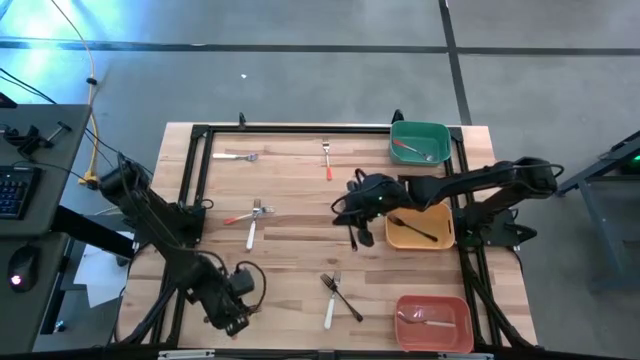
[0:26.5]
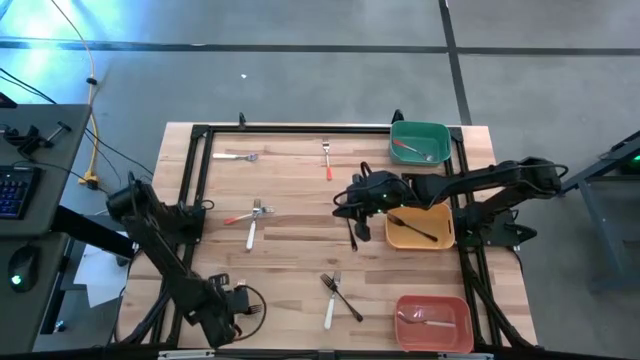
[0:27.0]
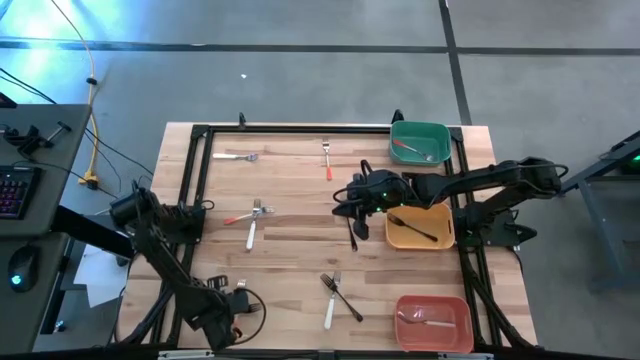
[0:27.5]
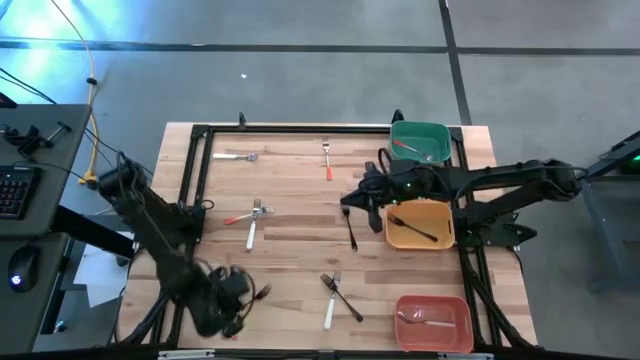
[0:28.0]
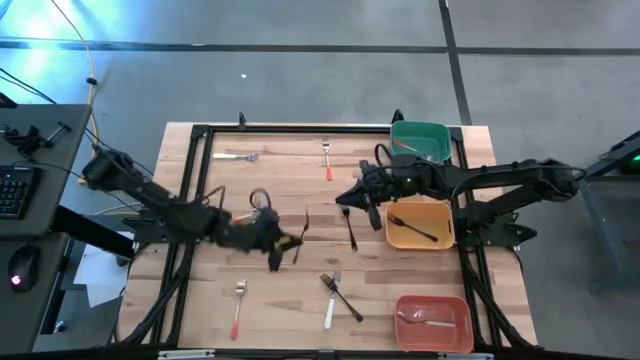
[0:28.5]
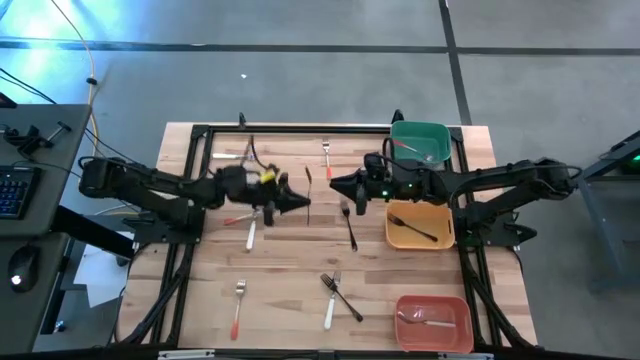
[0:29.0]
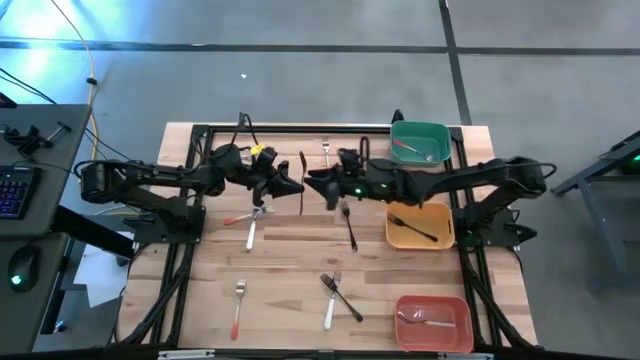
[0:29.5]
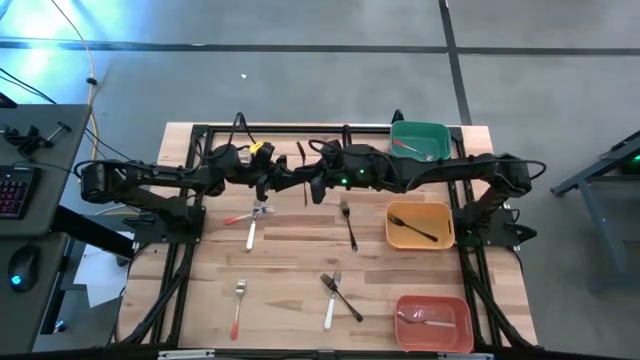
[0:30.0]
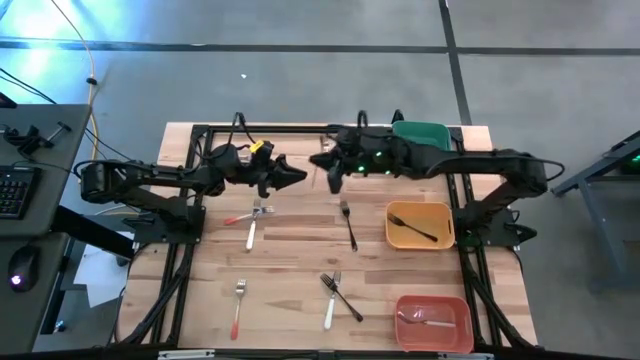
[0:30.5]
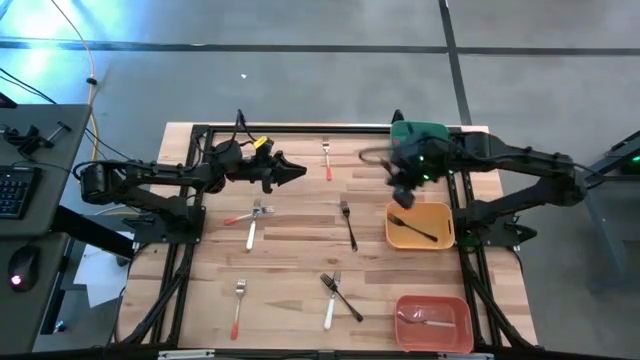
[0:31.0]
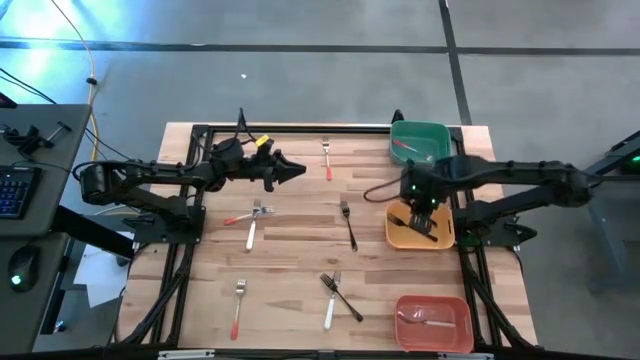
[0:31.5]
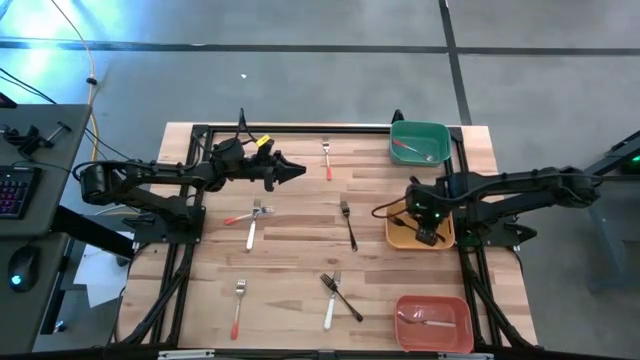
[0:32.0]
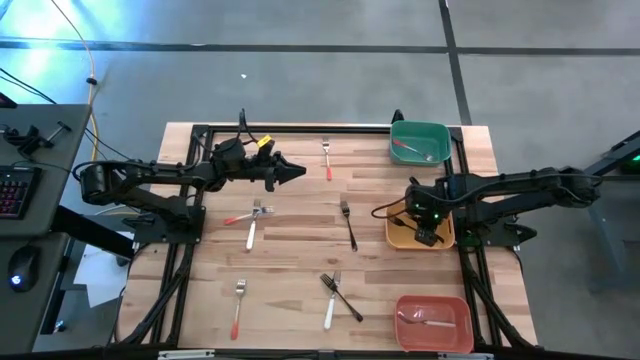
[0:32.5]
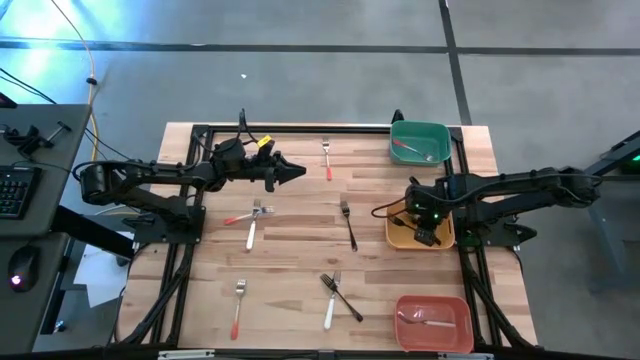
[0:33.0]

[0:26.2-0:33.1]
Task: Sort silverware by color (type)
Put the black fork into the yellow bin

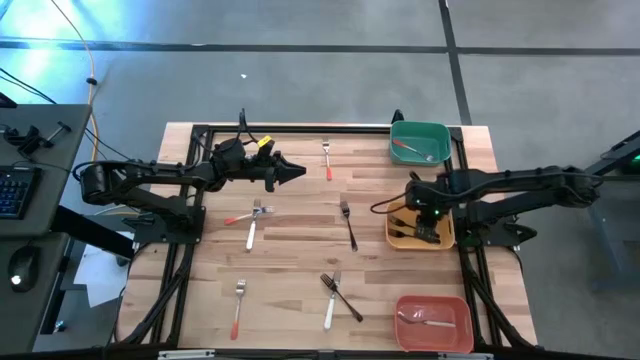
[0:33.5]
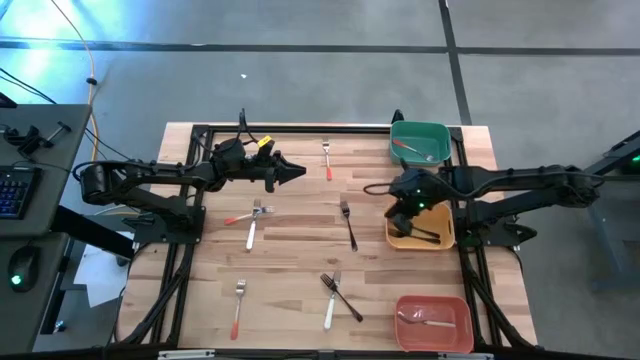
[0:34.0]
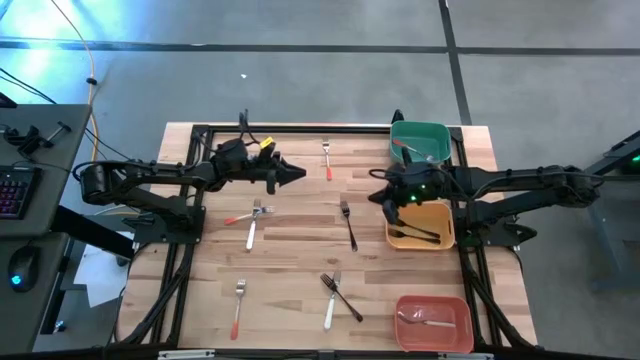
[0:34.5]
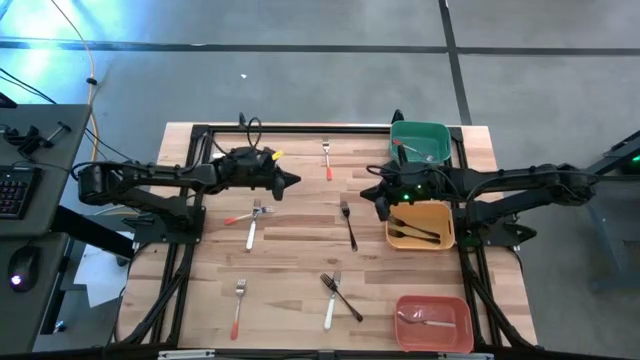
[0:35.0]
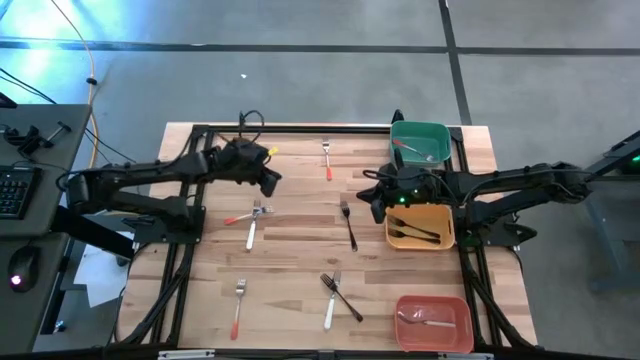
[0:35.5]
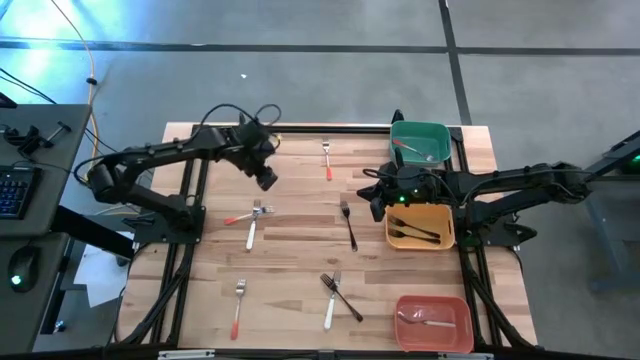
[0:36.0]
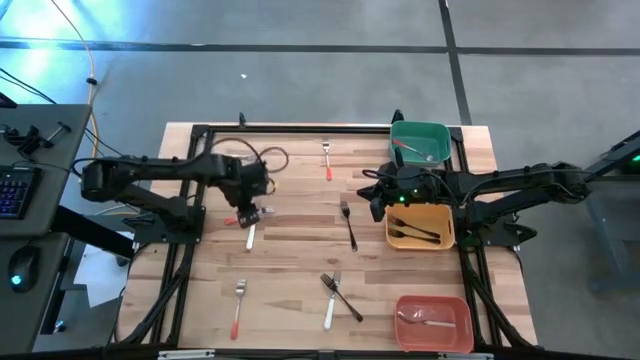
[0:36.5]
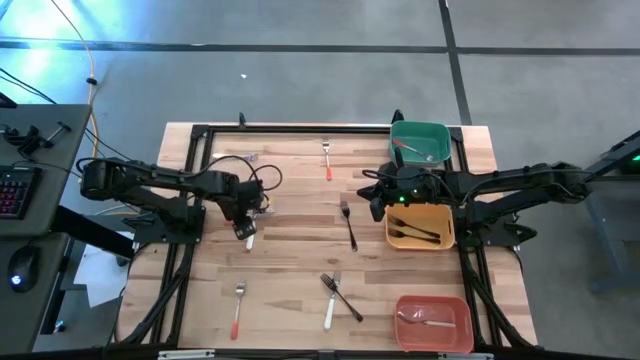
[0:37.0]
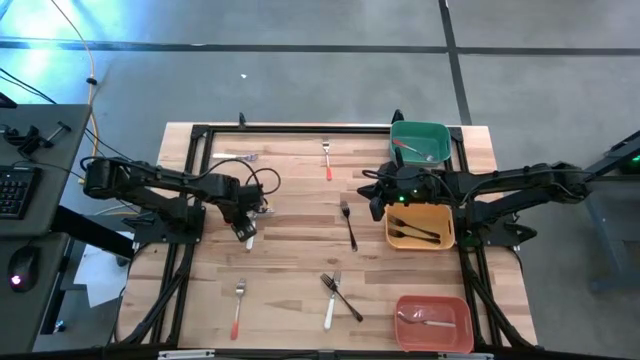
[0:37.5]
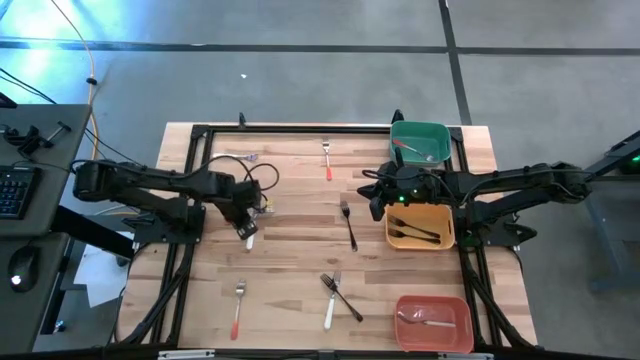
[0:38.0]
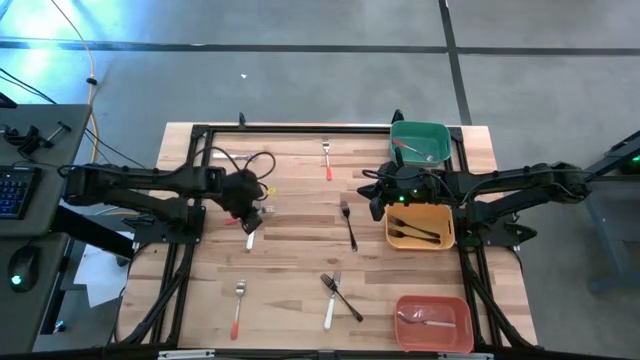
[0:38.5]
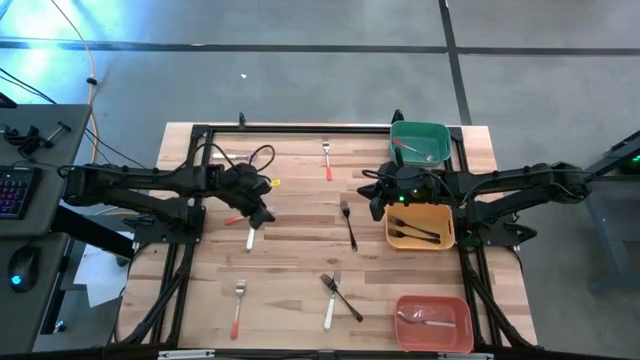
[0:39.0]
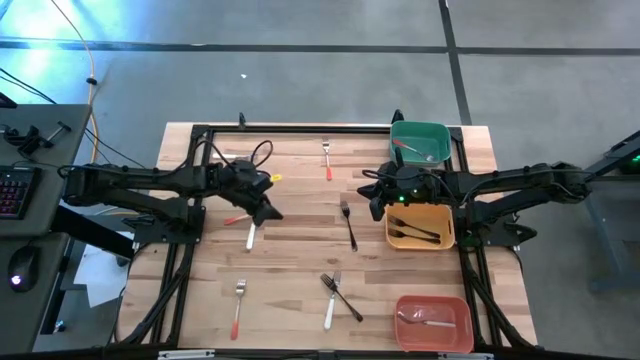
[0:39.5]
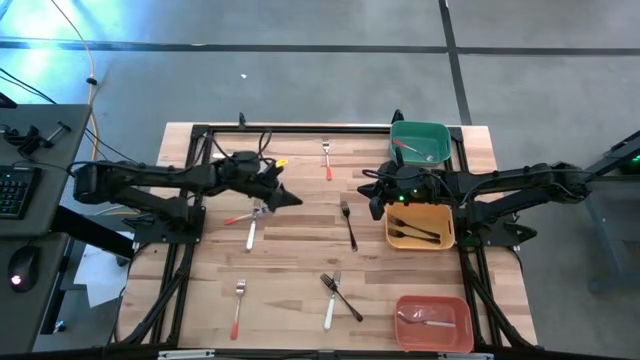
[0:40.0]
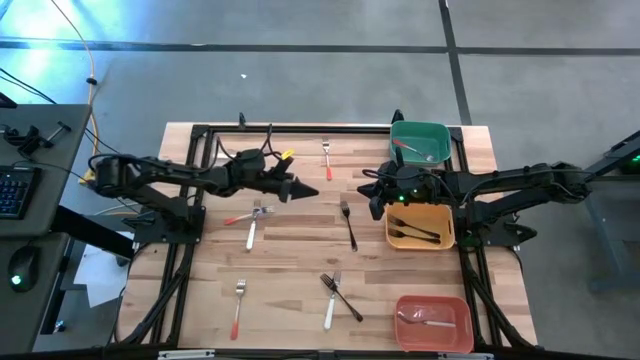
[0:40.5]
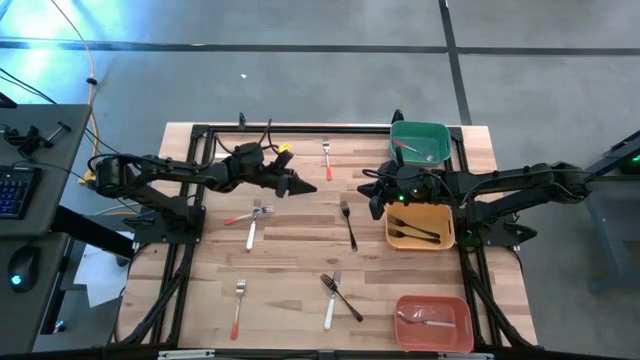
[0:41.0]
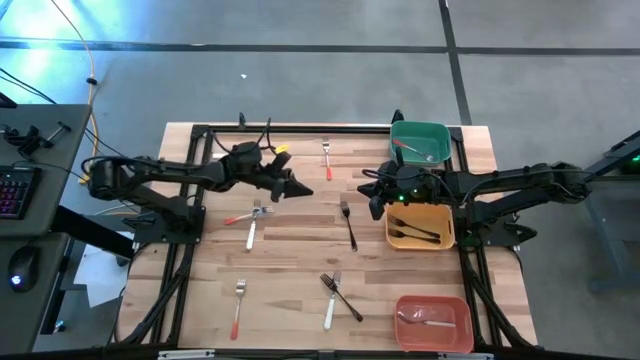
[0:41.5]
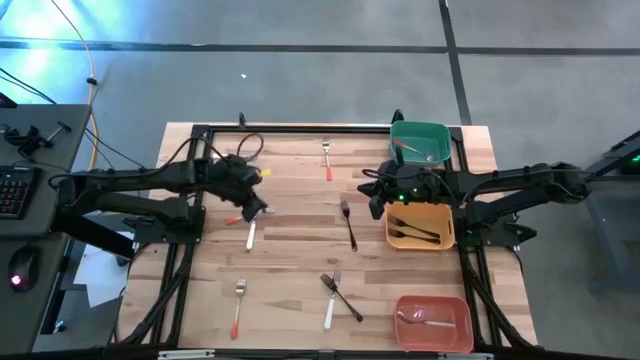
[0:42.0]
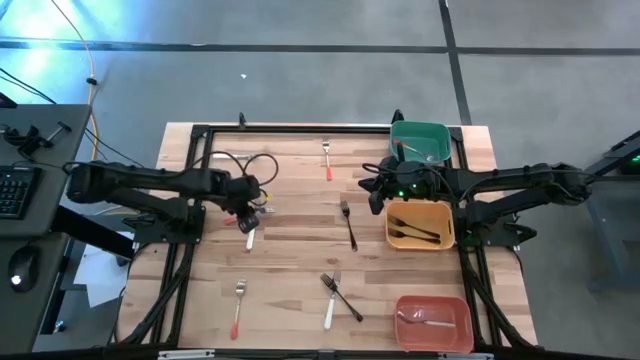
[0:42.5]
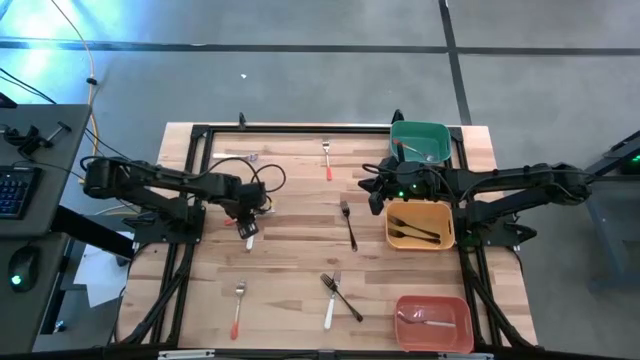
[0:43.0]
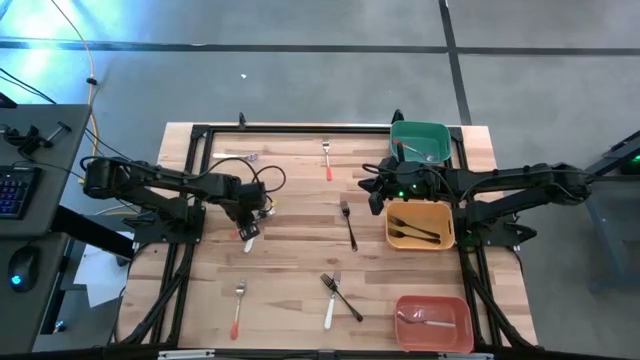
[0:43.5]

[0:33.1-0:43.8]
Put the orange fork into the green bin

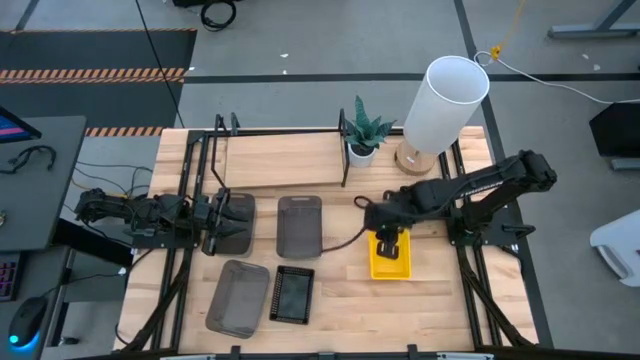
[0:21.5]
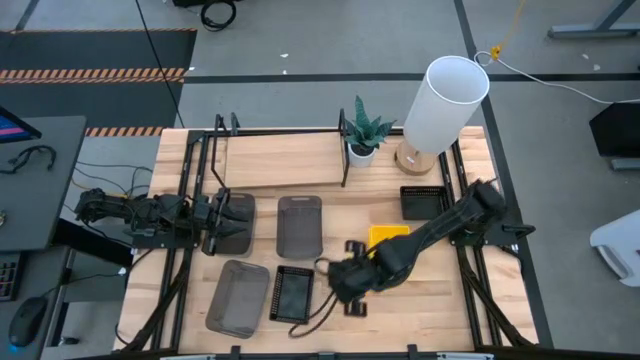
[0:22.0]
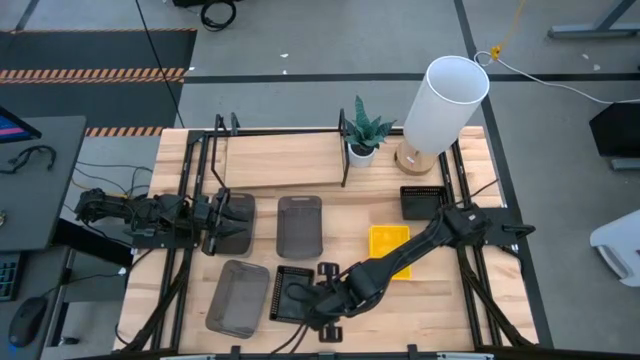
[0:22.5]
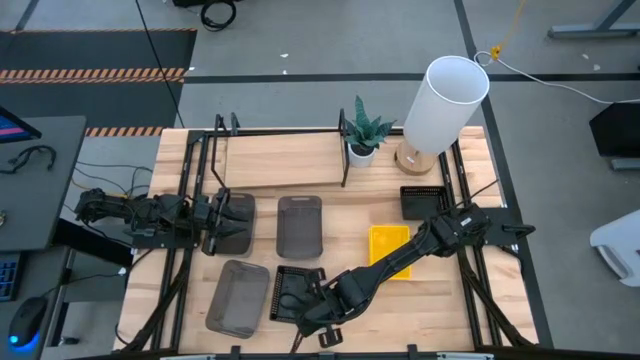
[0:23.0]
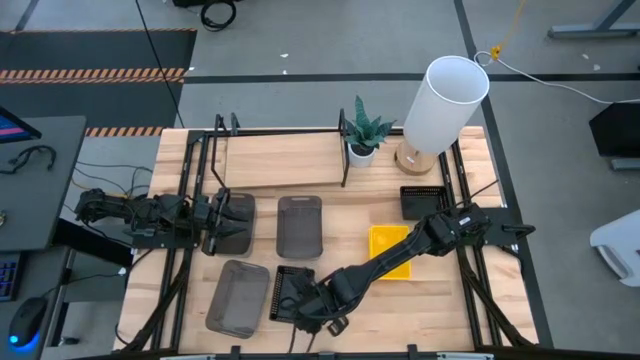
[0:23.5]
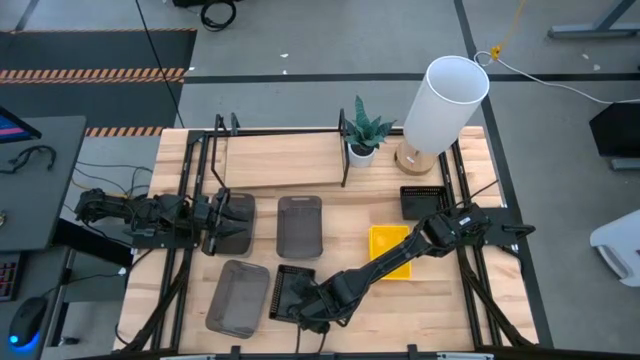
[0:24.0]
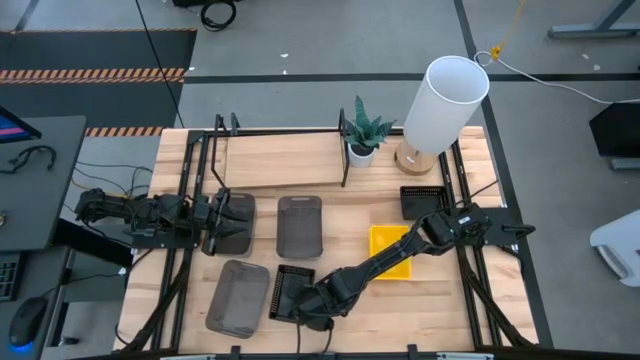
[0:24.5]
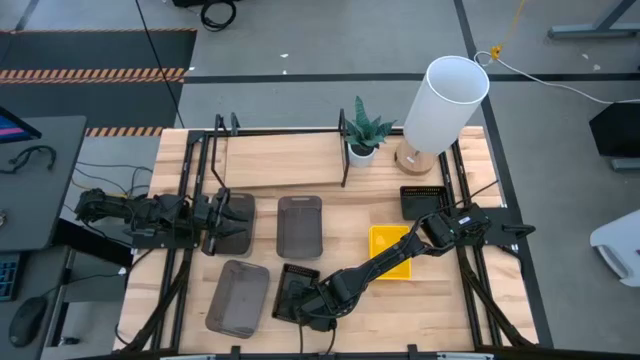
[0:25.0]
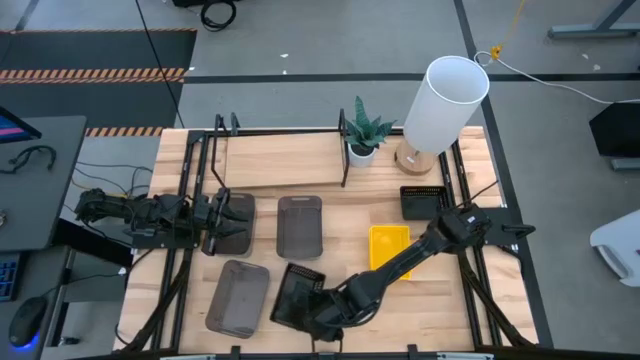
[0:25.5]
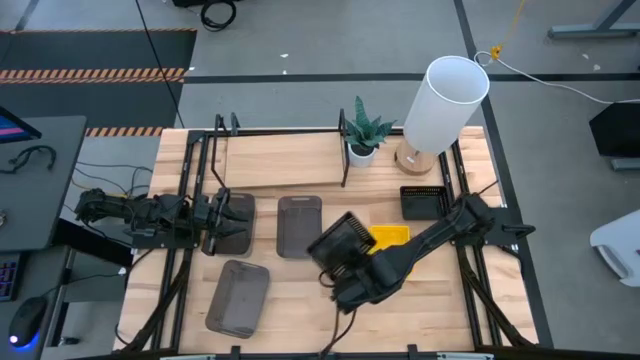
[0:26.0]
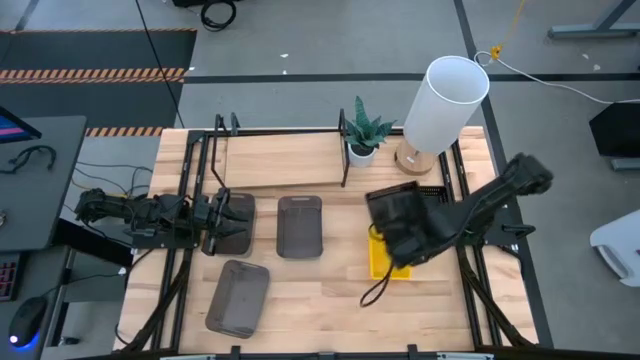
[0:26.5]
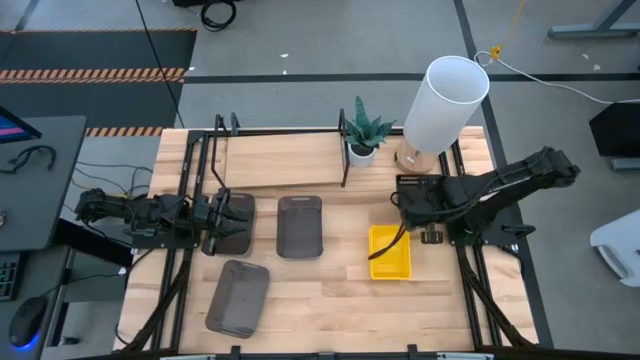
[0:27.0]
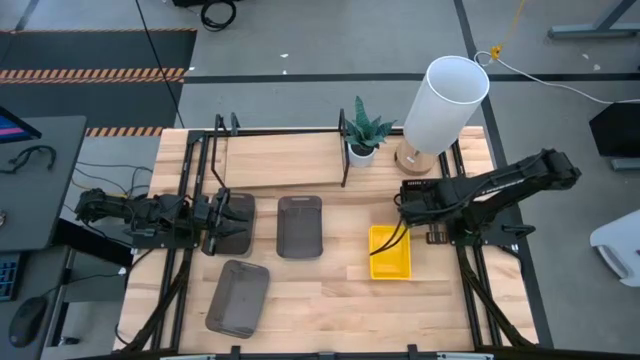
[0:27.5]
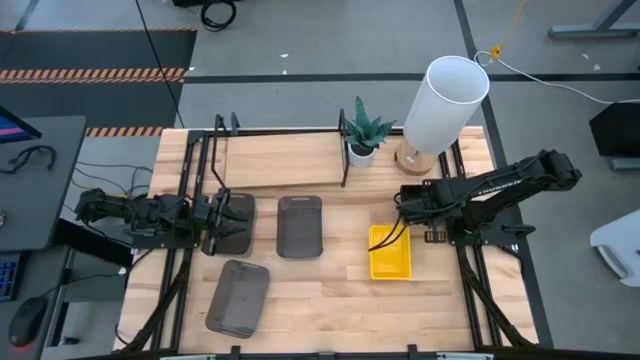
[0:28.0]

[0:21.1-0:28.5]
Task: Stack baskets on shelf by color
Stack the bottom black bin on the top of the top black bins
